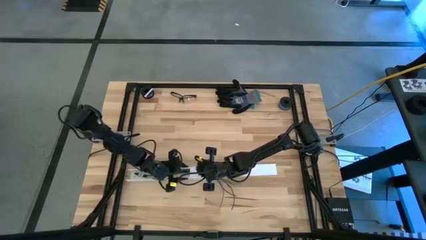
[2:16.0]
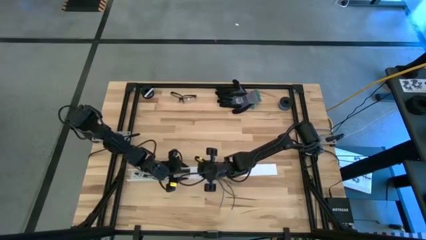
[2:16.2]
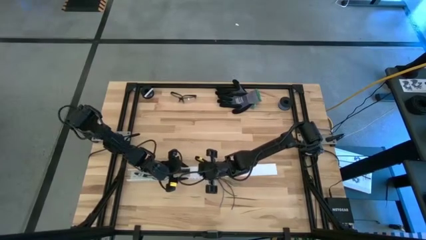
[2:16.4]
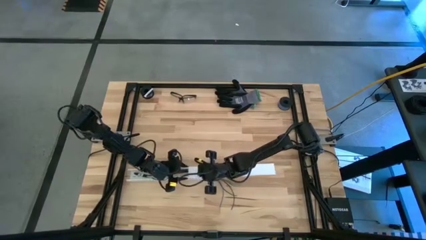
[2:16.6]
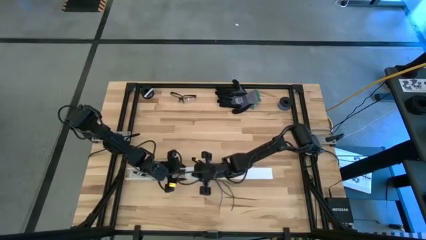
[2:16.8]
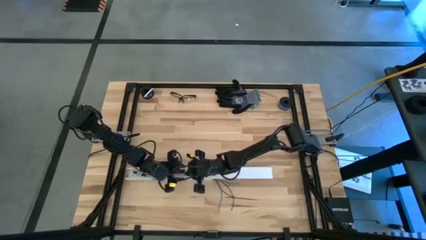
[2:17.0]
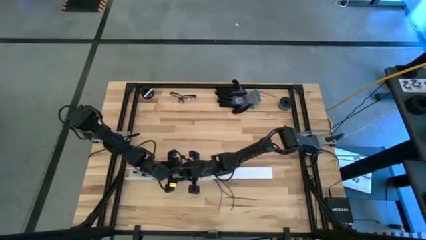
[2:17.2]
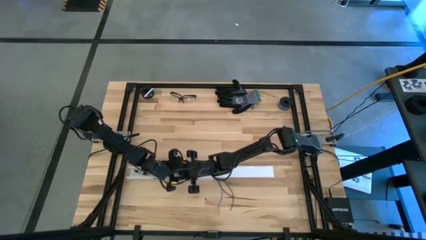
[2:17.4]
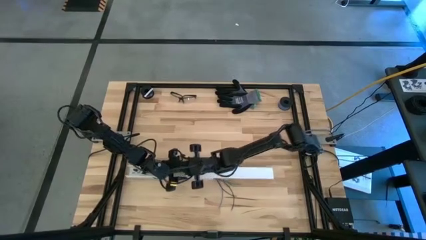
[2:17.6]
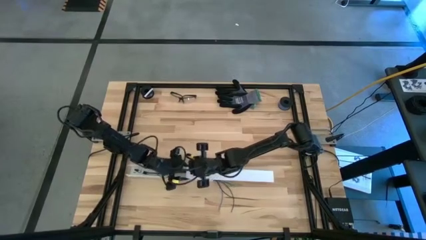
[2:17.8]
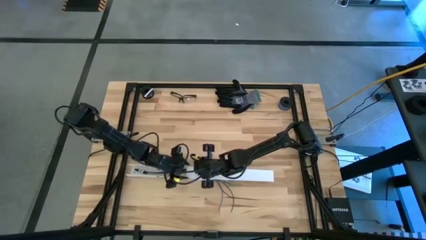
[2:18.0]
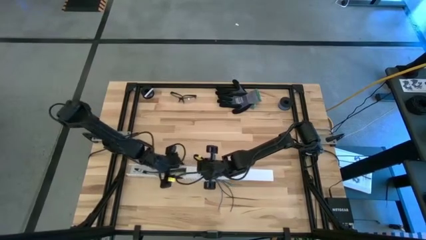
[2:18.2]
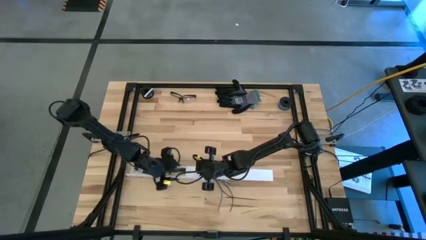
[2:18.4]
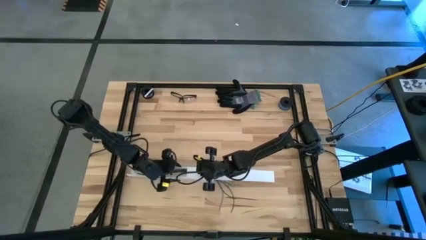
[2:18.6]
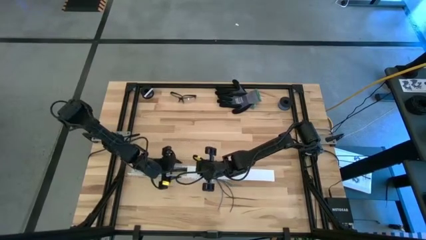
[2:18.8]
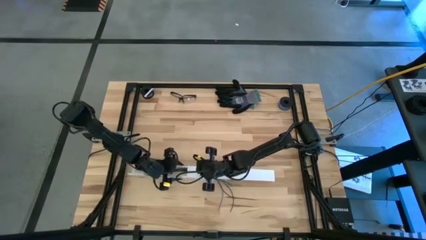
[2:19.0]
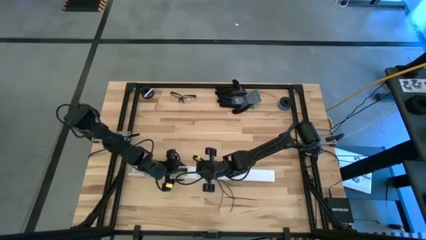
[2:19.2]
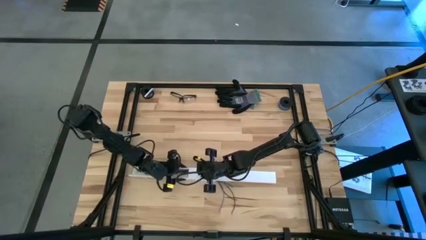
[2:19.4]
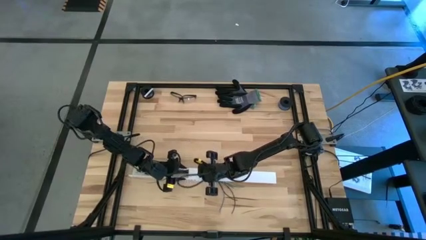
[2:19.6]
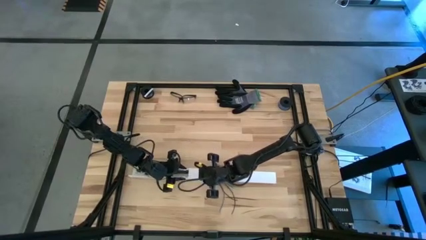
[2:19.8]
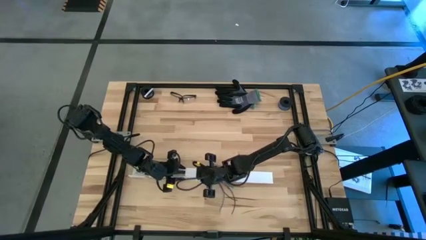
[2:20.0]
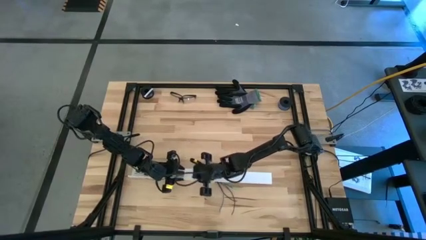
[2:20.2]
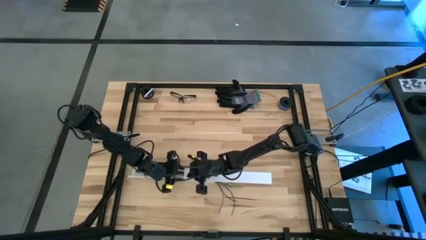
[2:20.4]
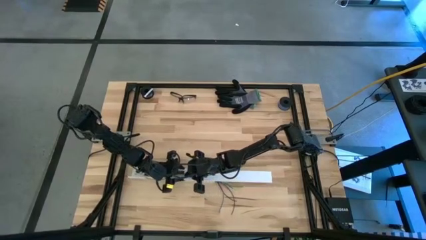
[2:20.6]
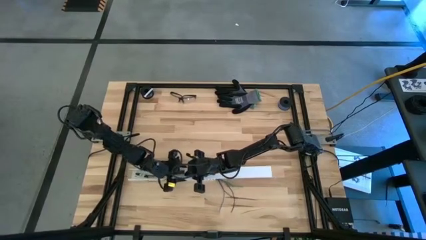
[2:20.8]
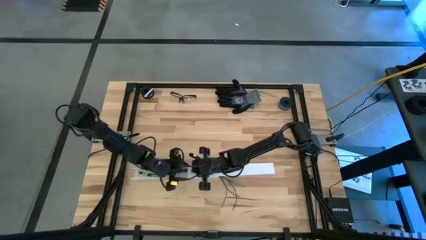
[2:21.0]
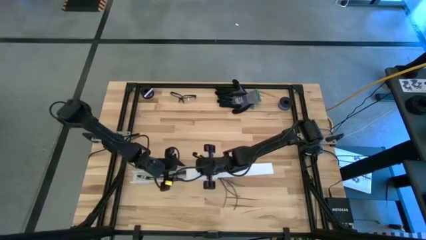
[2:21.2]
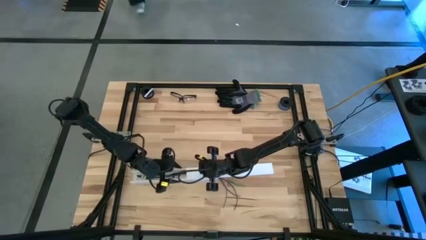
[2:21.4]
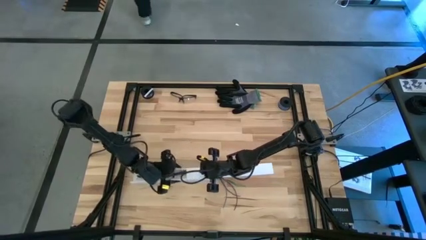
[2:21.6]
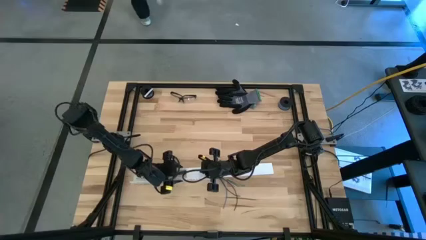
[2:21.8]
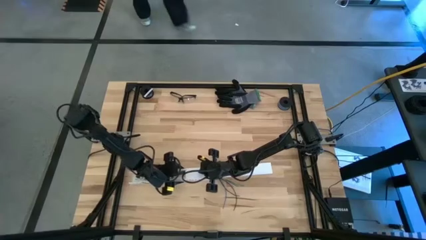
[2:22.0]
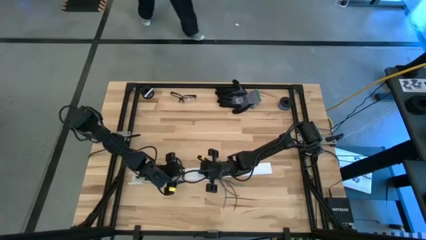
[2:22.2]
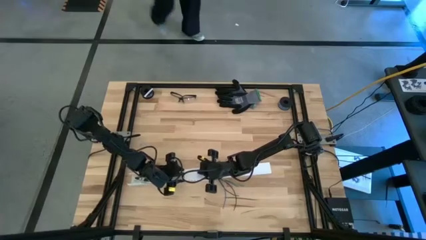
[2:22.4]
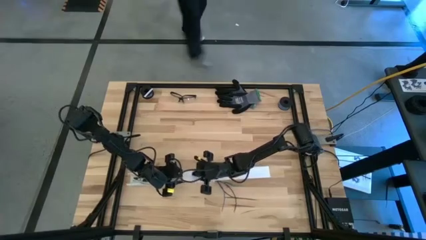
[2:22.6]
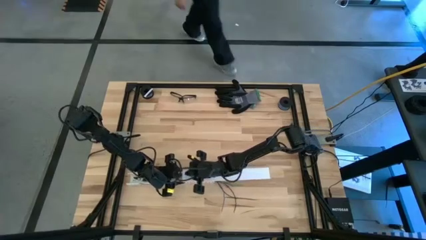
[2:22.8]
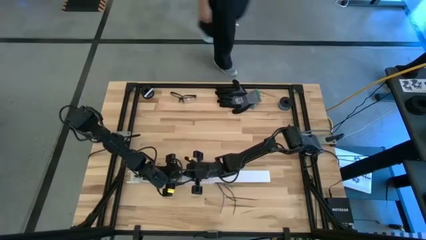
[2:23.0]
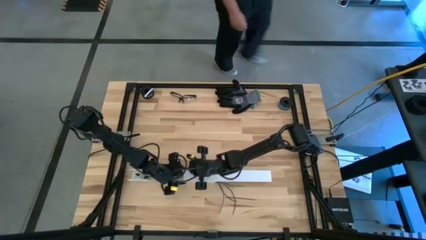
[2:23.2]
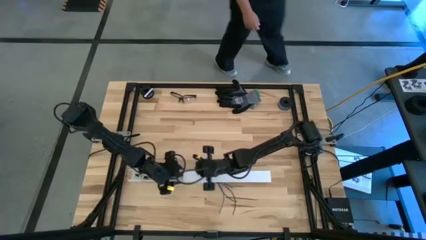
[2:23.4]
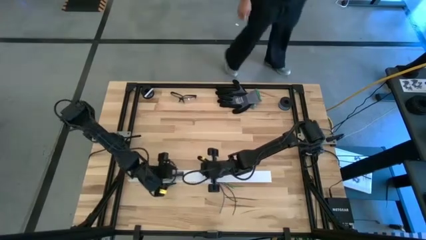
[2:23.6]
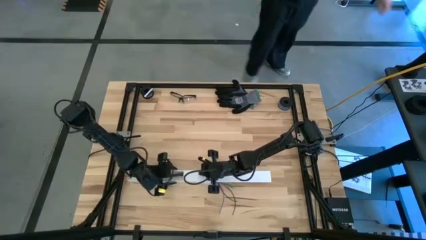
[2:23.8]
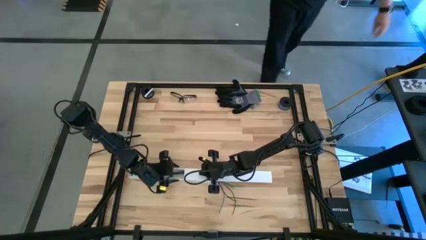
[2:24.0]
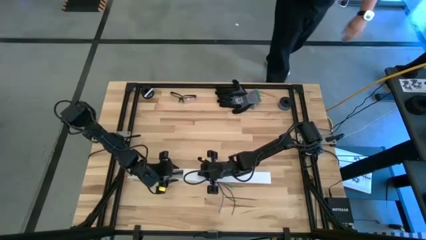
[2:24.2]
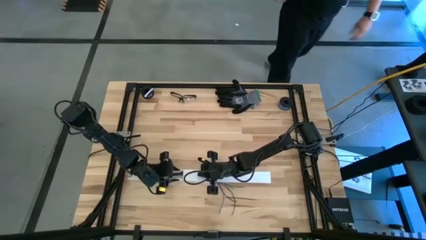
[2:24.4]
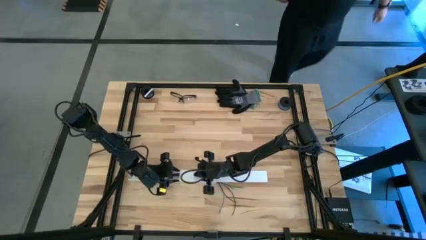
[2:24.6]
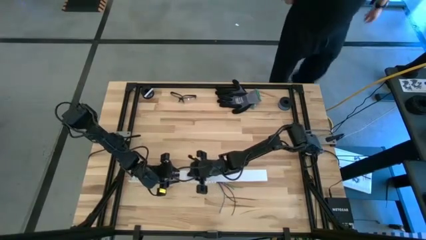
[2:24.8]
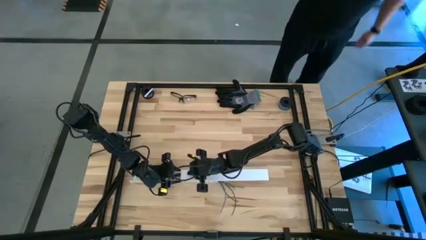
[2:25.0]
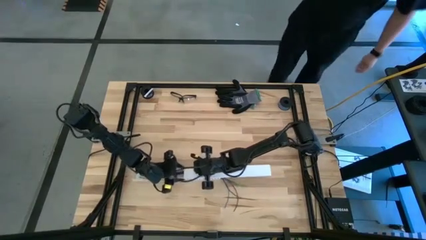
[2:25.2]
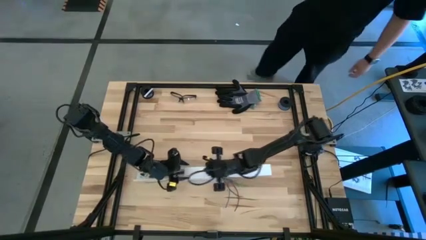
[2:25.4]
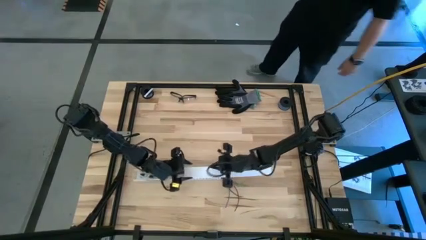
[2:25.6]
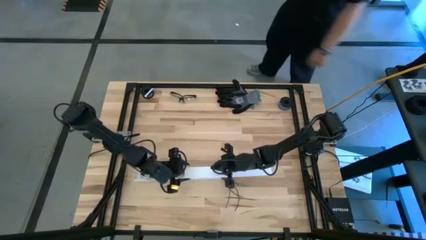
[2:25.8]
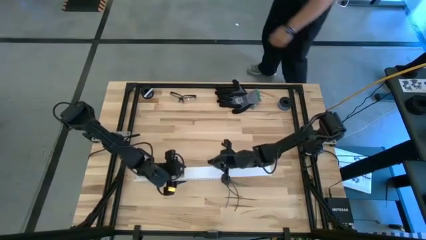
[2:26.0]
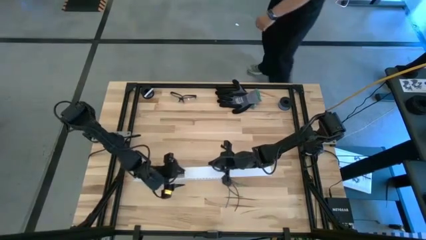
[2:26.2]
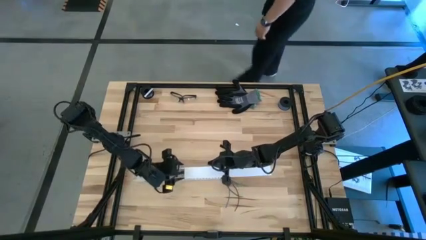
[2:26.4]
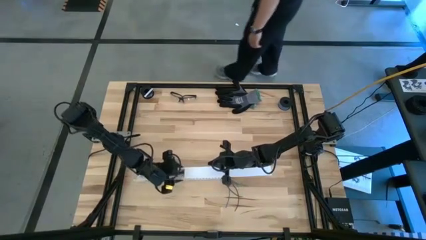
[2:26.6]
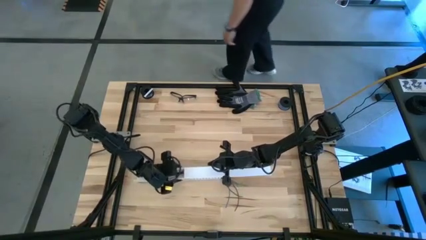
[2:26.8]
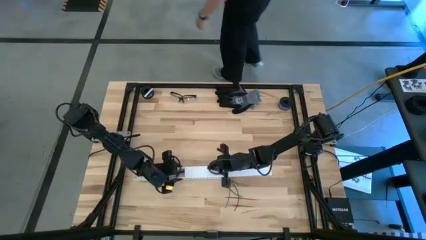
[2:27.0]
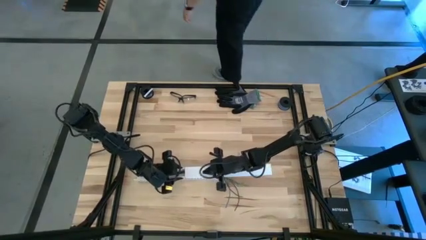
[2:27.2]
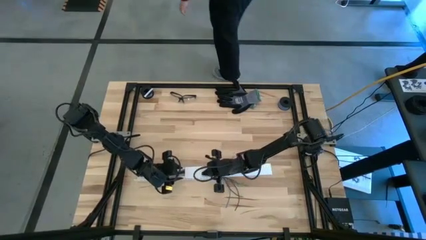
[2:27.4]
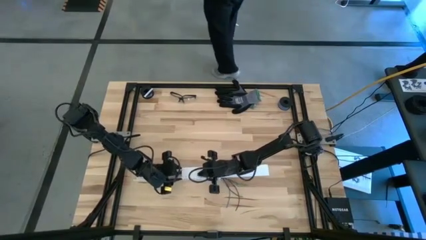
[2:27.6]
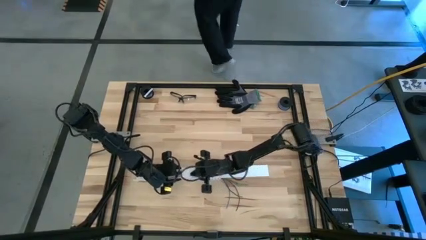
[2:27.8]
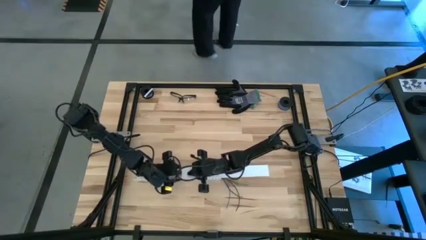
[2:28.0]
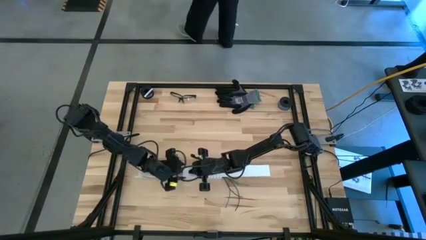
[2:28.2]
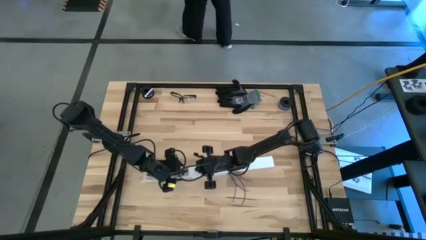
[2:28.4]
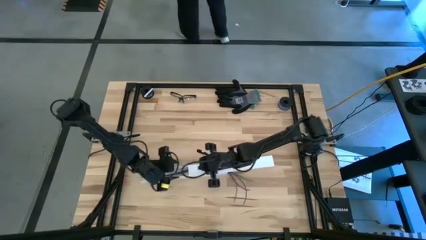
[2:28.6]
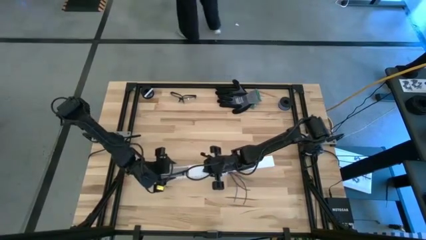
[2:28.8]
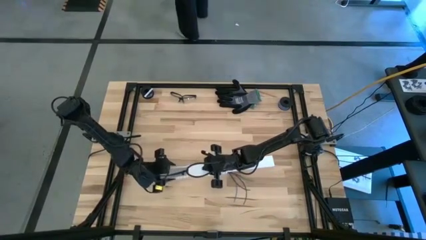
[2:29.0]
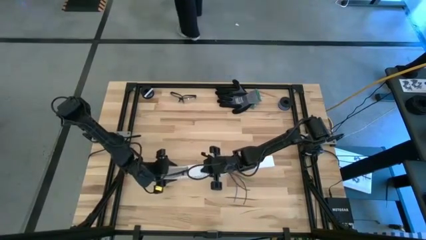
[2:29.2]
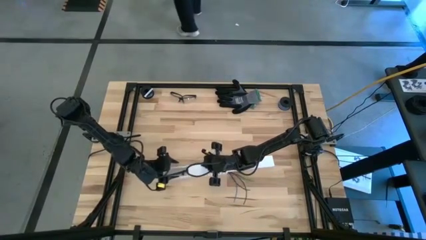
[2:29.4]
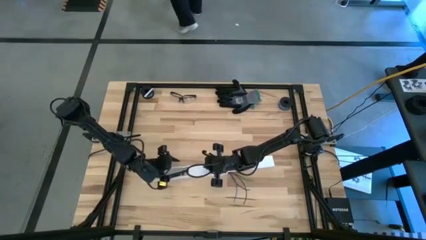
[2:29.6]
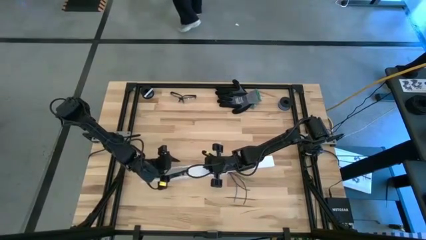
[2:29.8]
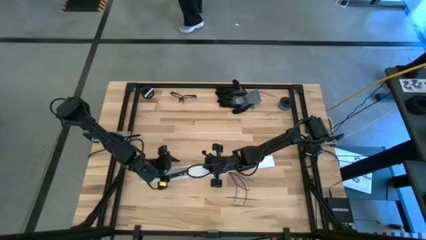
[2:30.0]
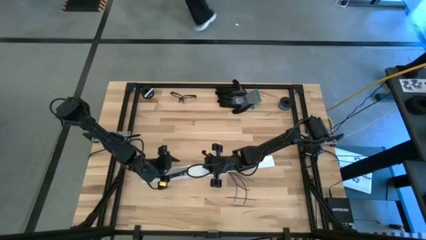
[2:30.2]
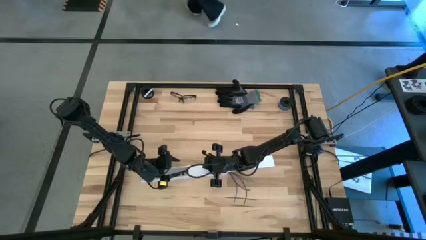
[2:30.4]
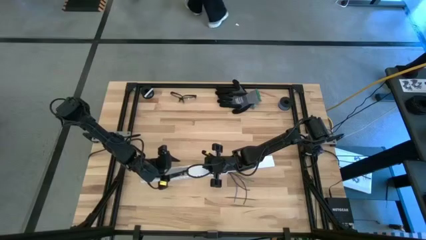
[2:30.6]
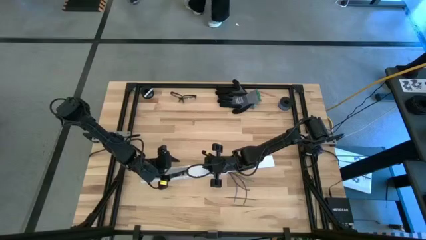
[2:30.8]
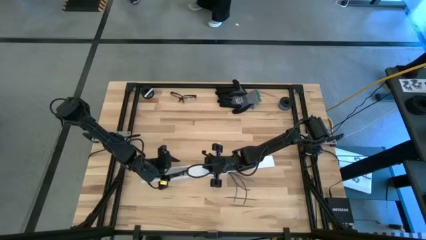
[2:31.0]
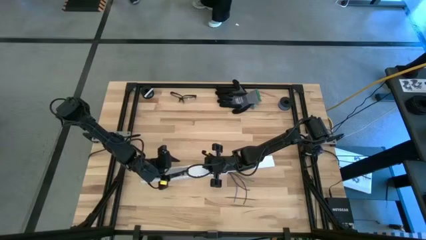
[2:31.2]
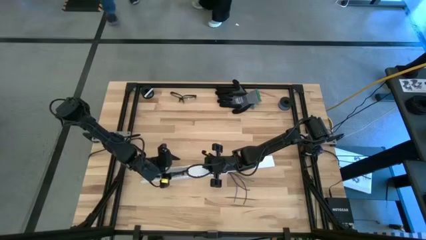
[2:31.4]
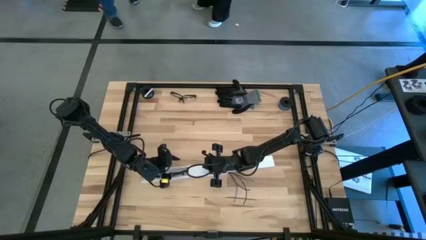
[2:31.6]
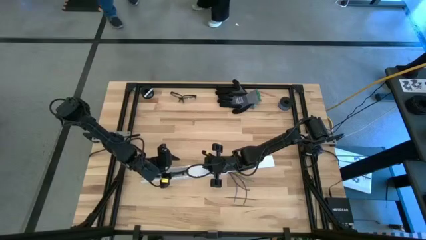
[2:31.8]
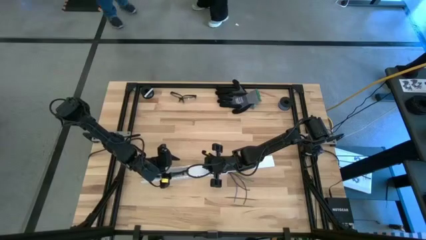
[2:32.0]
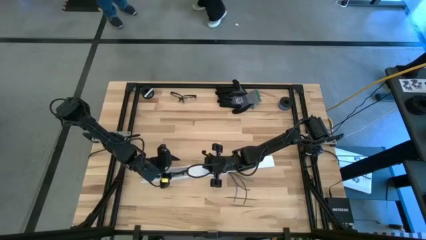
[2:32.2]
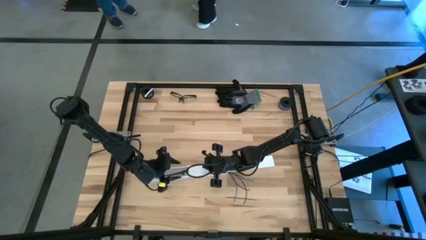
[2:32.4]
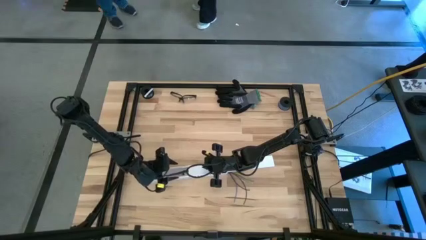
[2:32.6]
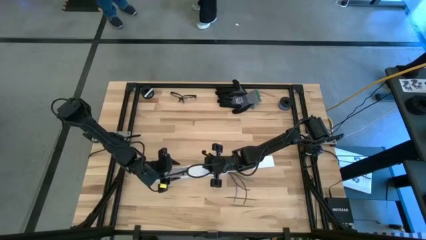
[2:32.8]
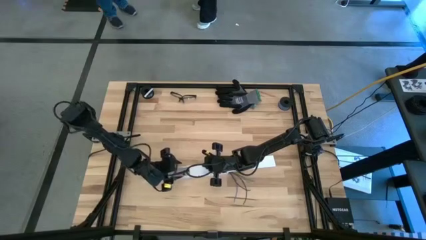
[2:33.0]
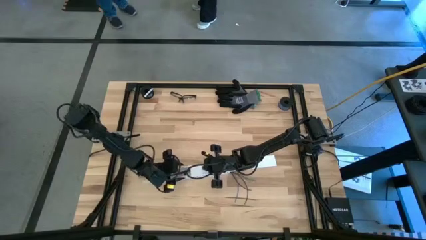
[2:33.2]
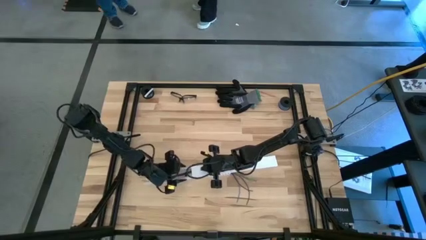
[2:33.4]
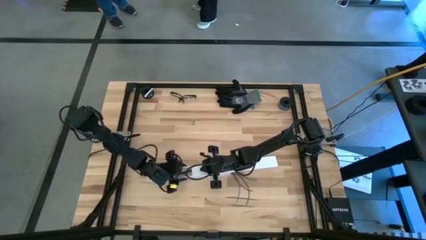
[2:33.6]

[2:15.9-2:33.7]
Task: Ziptie cables
Close the cable duct
